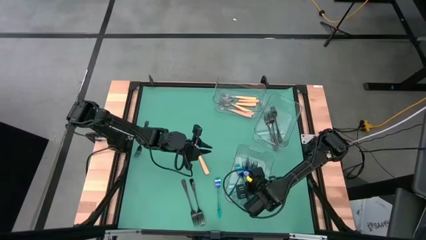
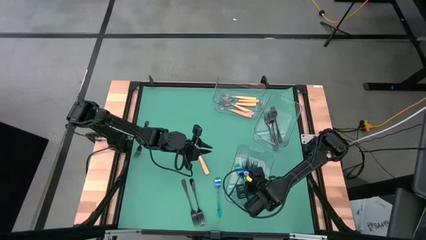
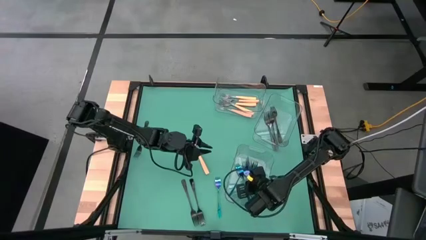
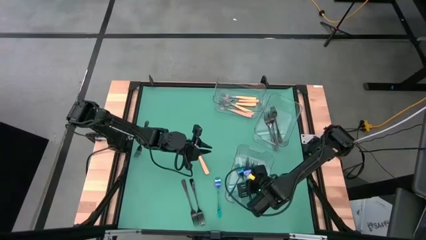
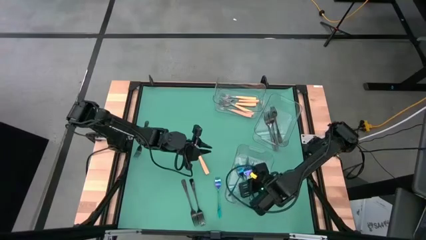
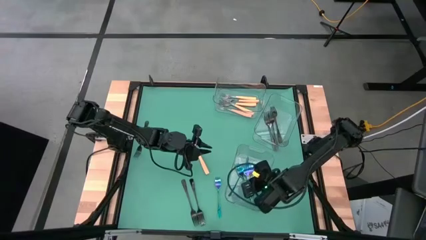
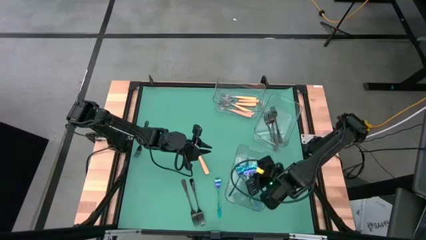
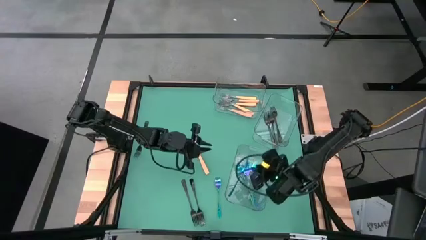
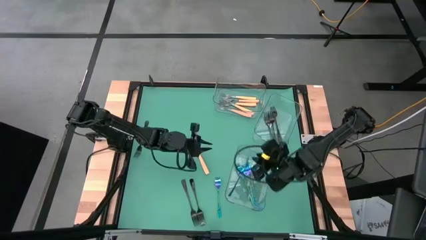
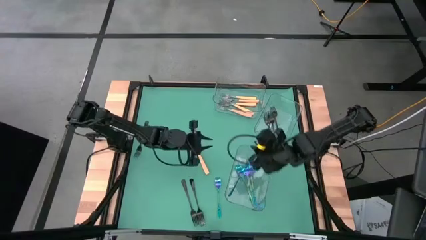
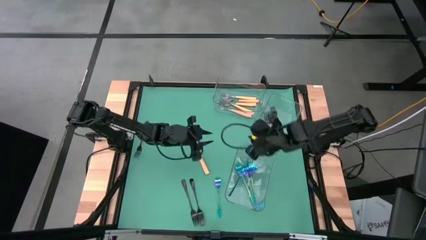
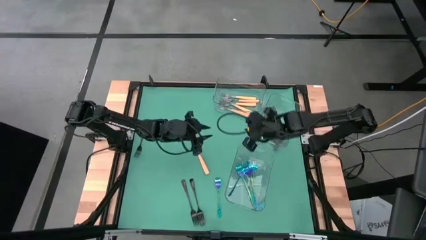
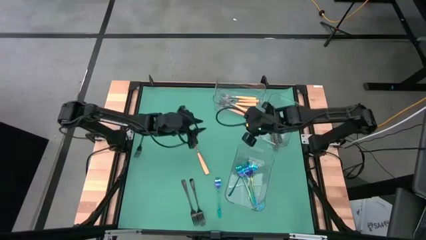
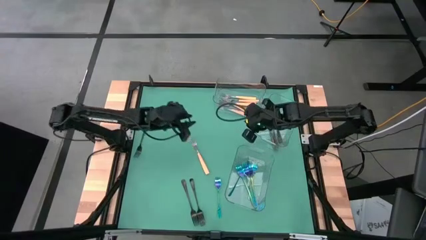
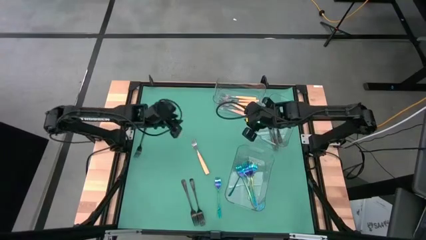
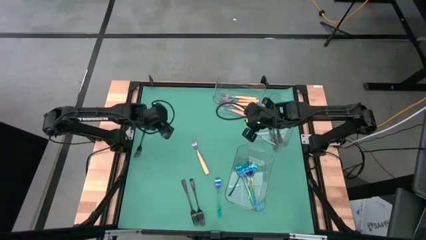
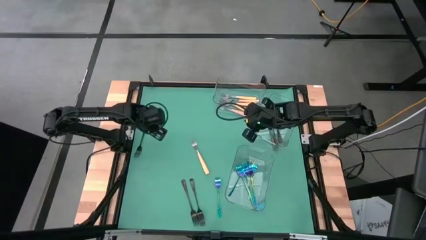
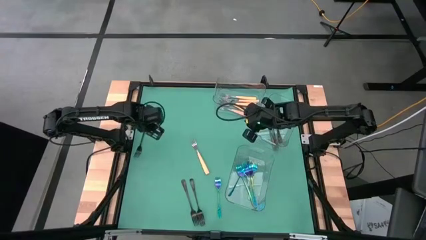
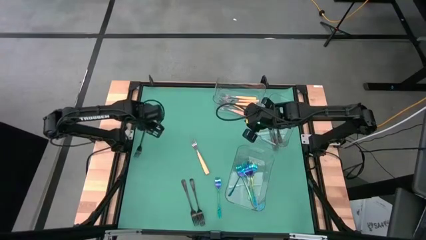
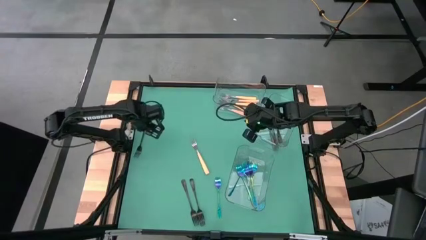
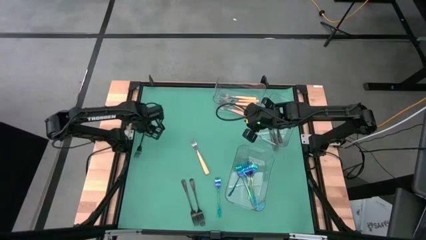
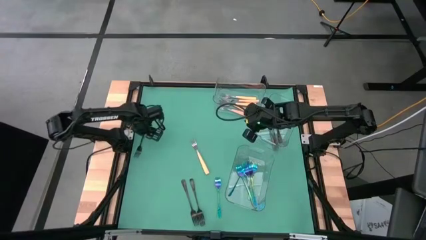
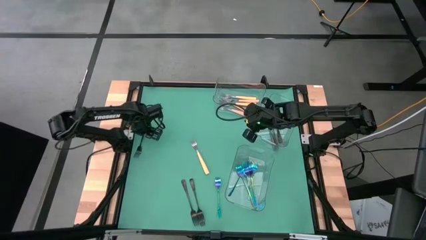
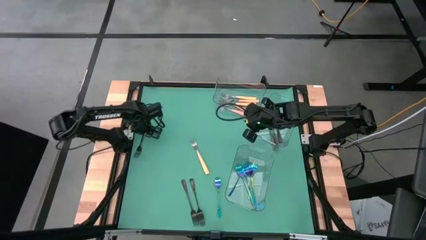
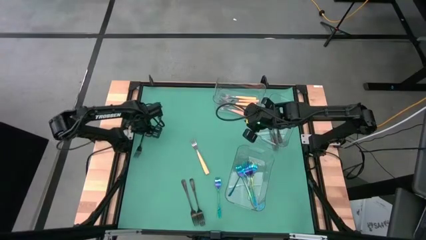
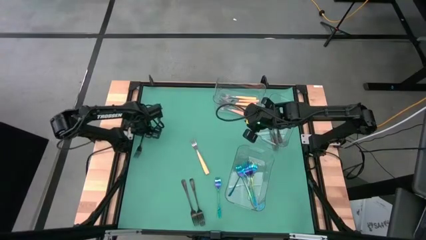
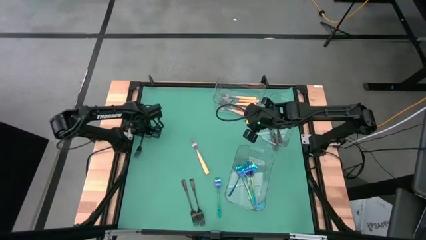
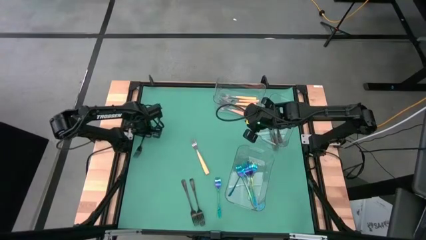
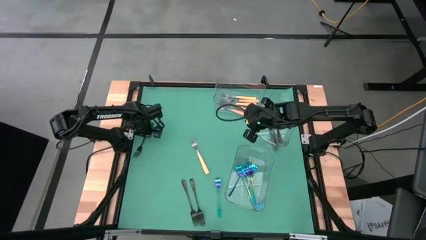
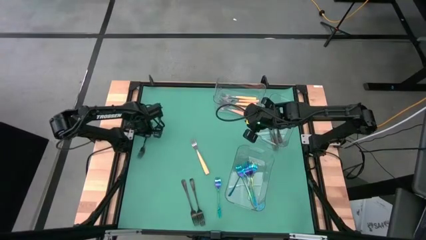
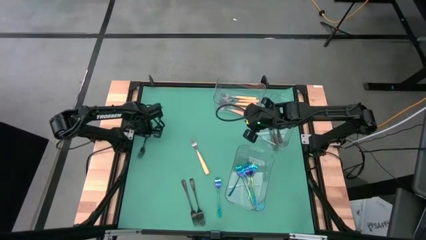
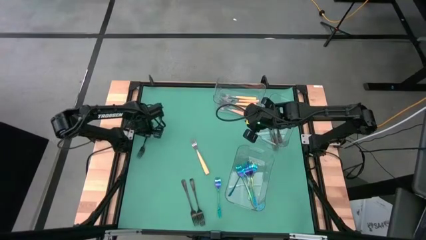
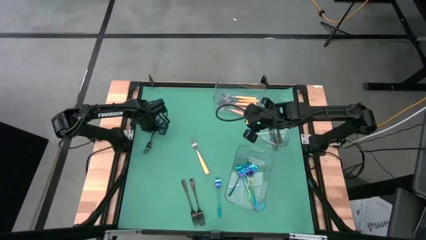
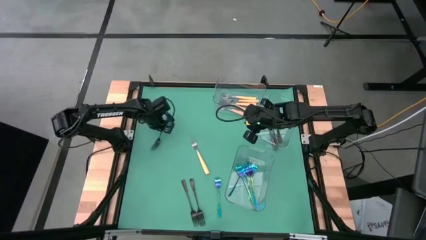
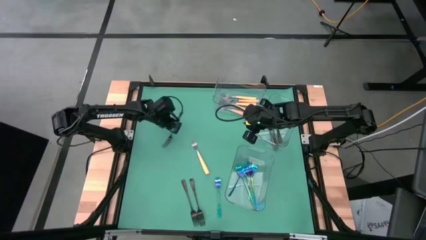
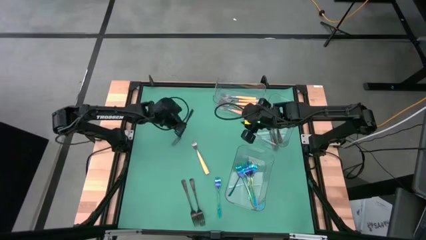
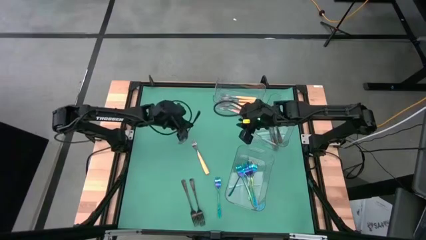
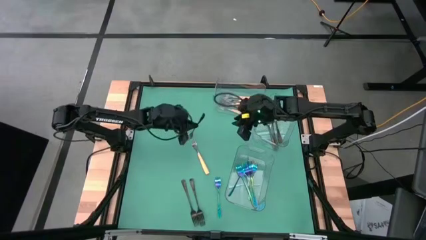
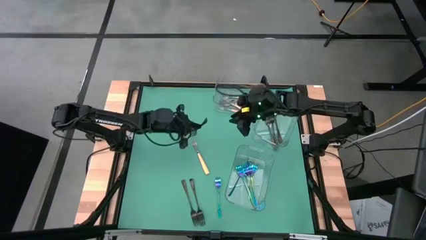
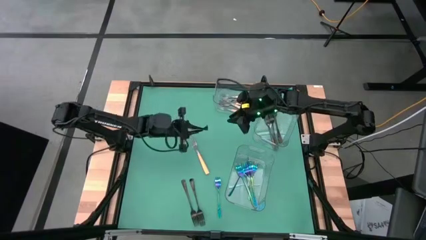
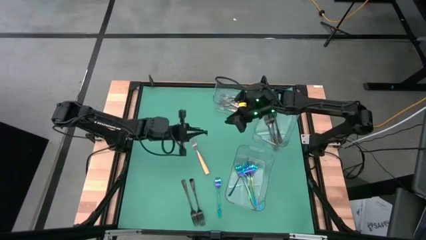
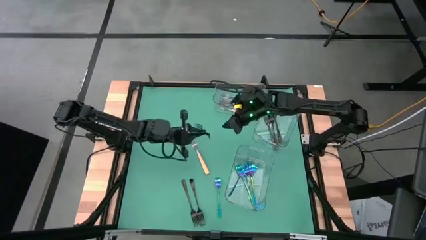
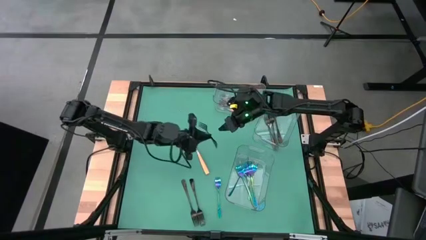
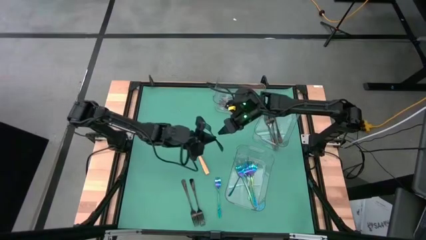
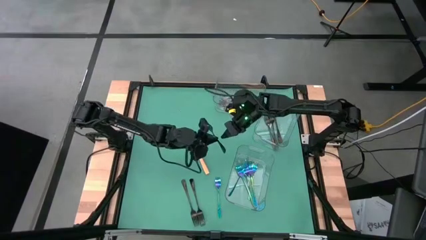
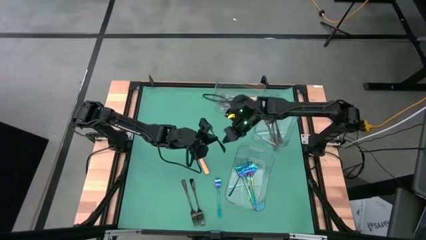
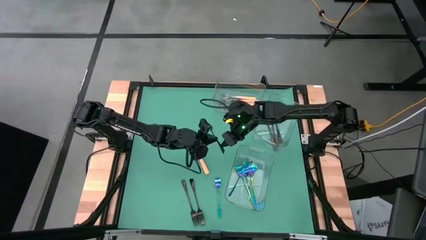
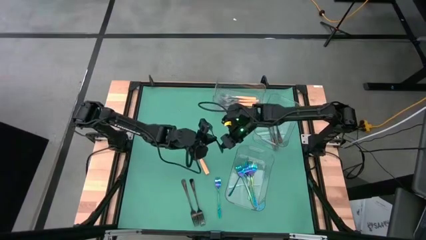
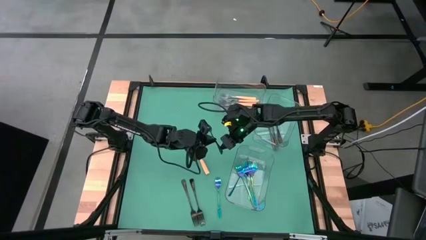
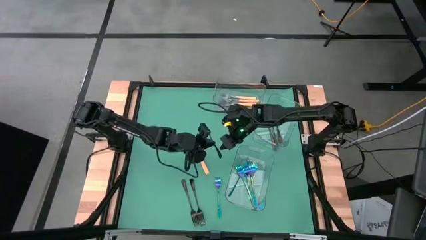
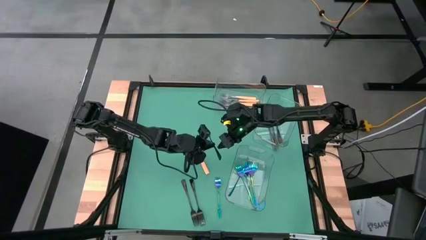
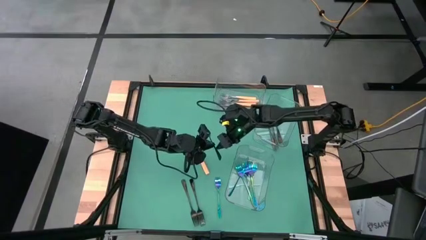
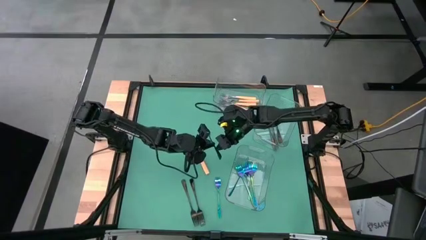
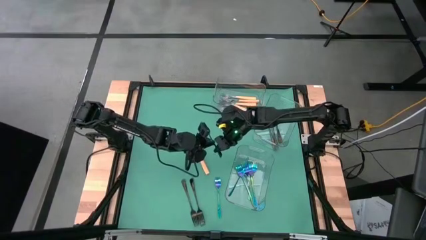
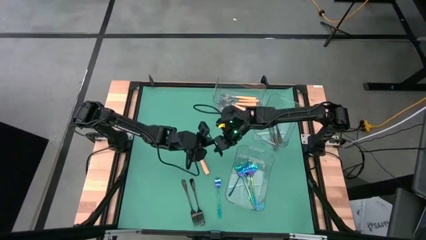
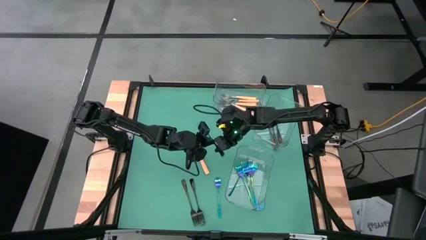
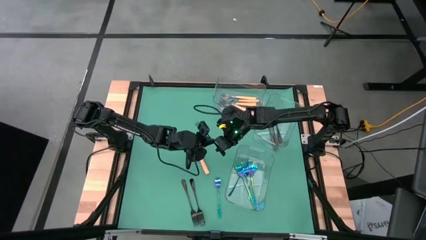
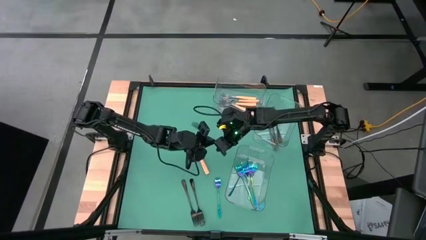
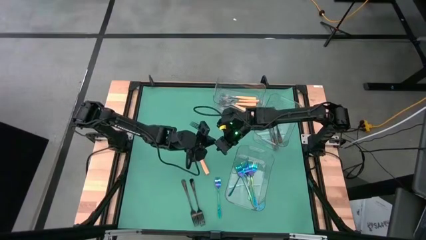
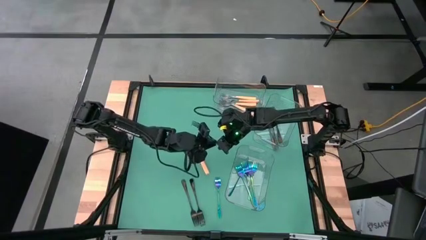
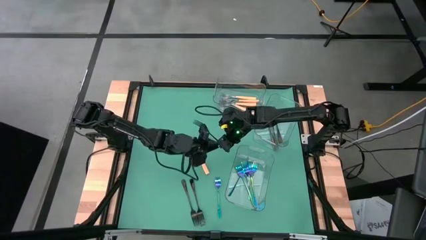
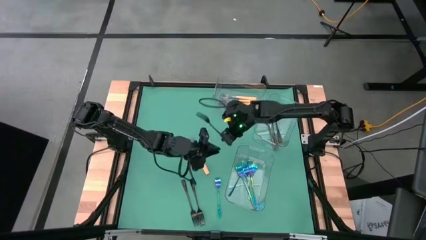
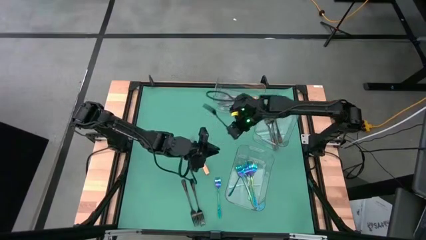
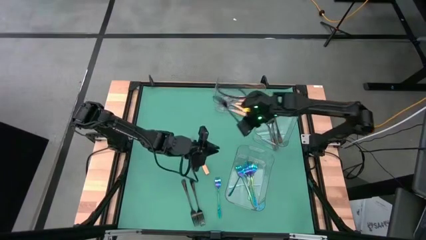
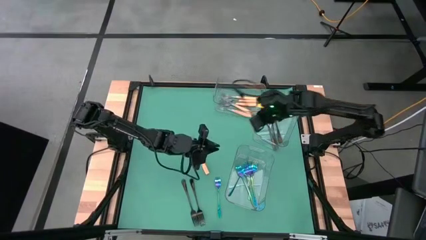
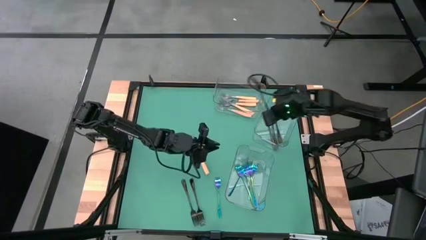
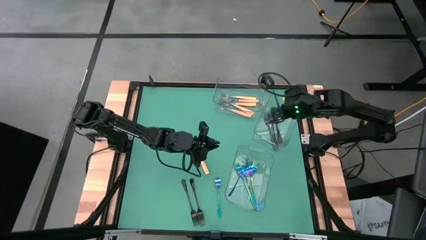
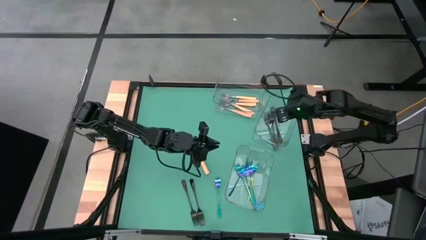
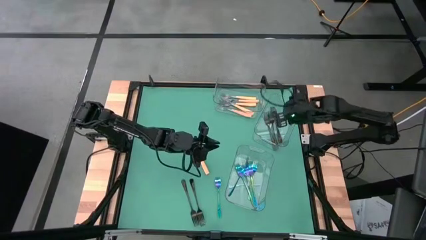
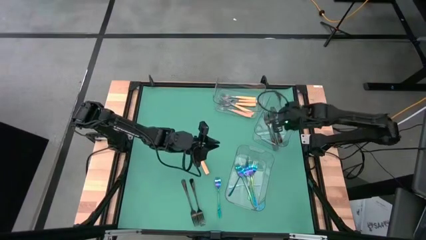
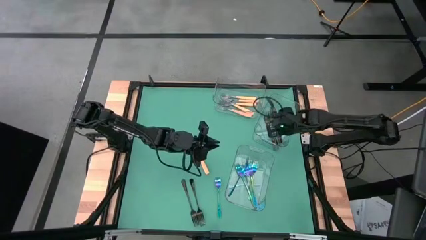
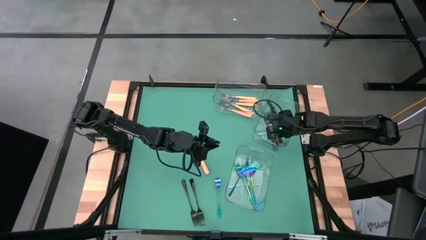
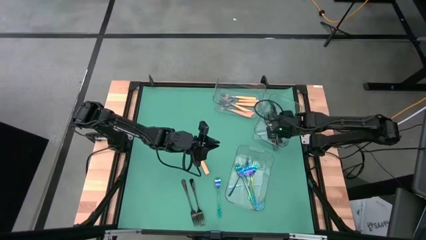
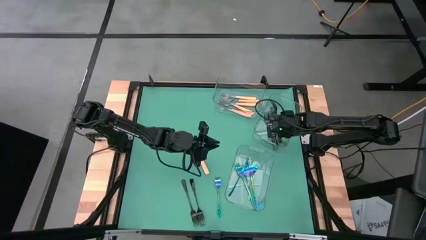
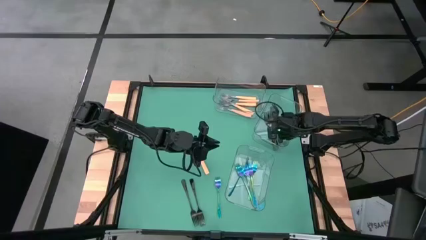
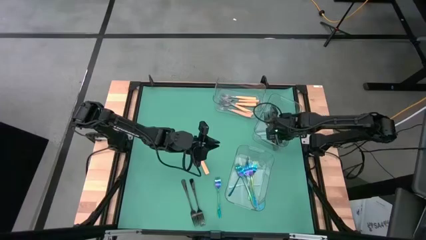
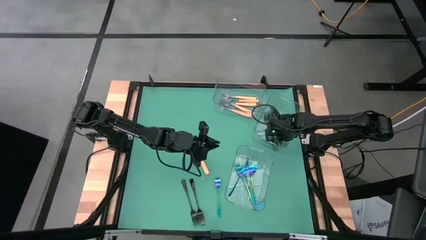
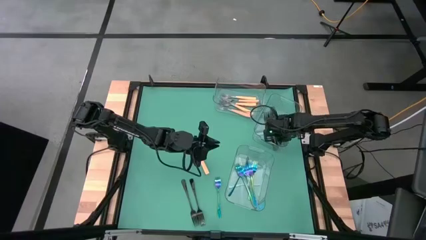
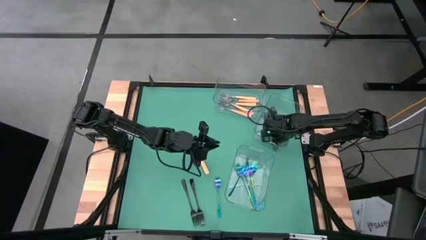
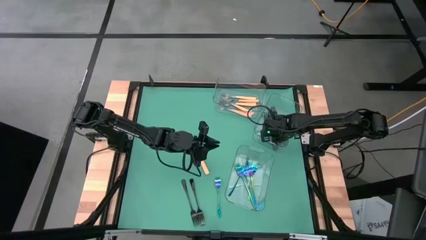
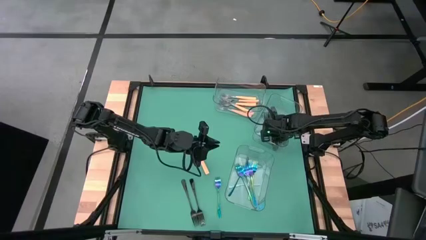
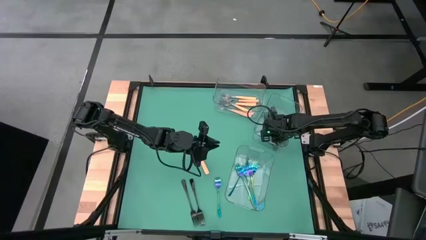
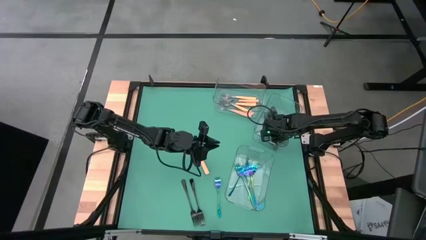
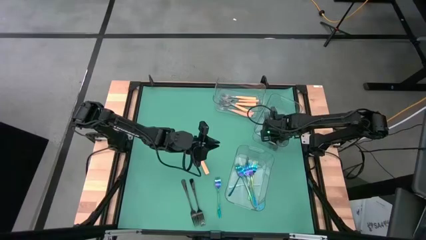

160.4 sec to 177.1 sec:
Task: Sort silverware by color (type)
Put the black fork into the center transparent bin

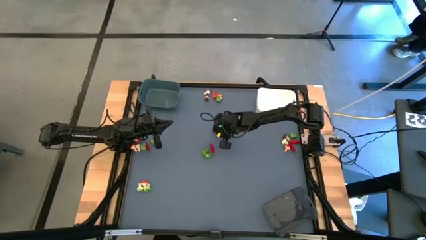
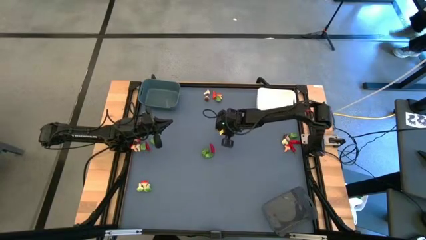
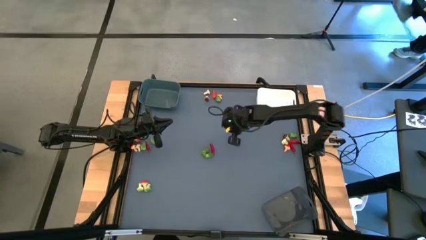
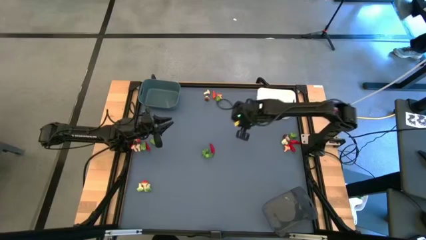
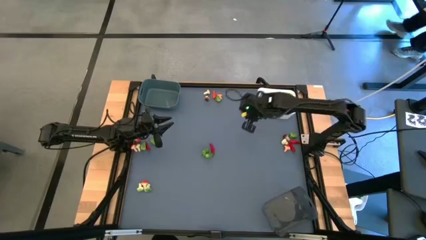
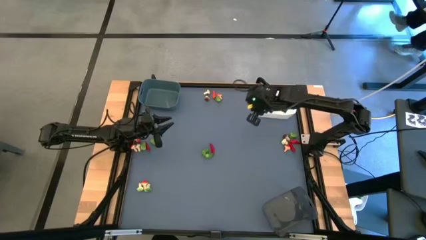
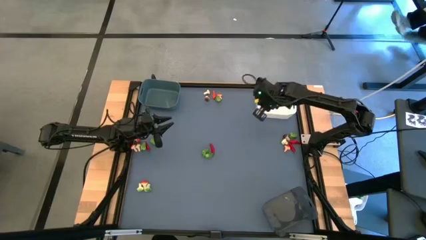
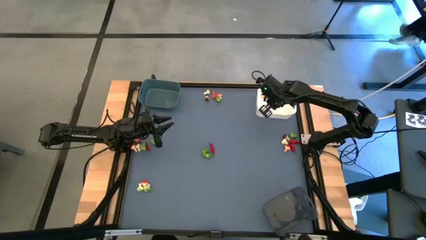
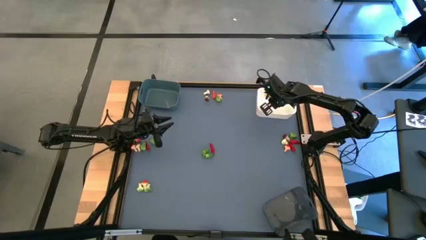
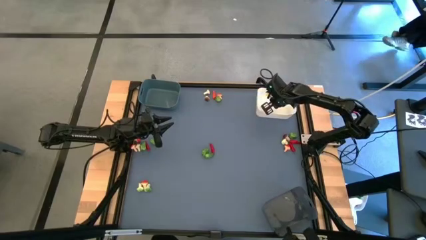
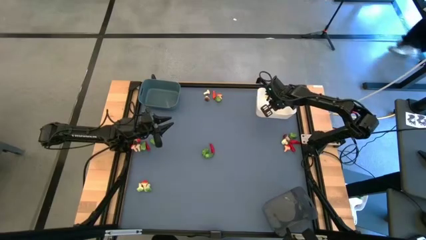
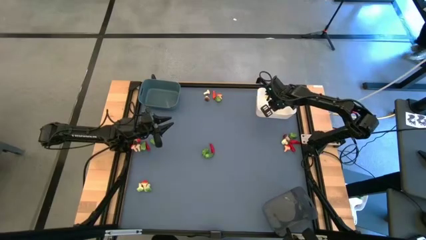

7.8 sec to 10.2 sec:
Task: Sort produce into baskets
Put the green chili pepper into the white bin
